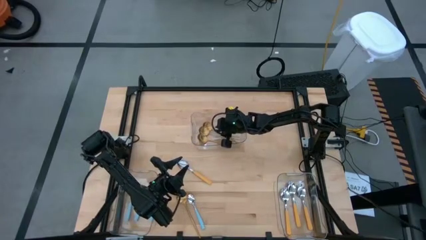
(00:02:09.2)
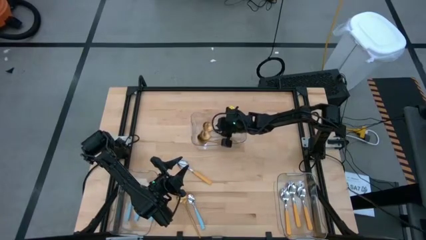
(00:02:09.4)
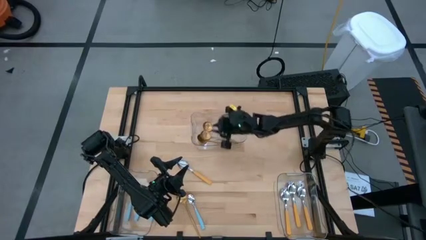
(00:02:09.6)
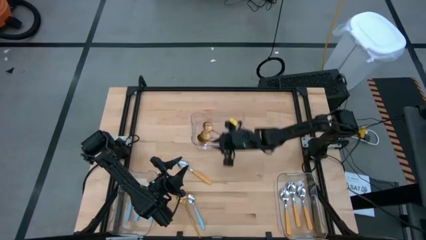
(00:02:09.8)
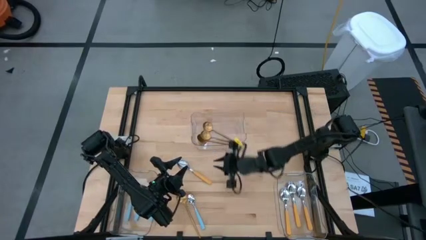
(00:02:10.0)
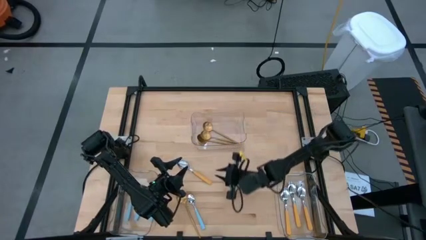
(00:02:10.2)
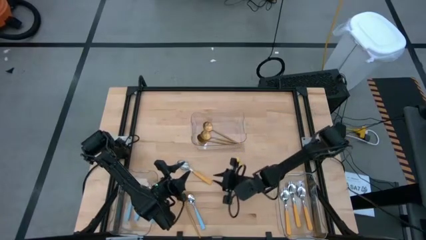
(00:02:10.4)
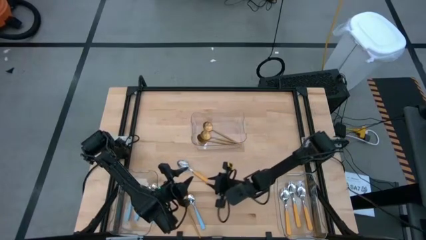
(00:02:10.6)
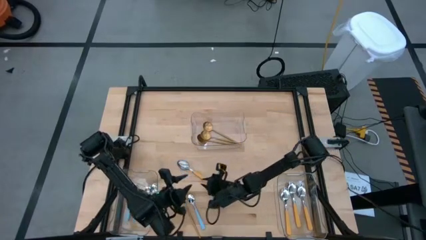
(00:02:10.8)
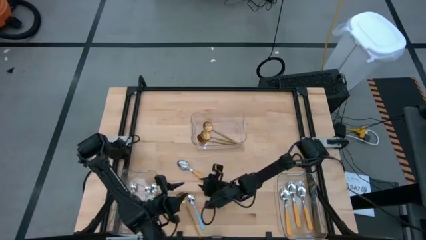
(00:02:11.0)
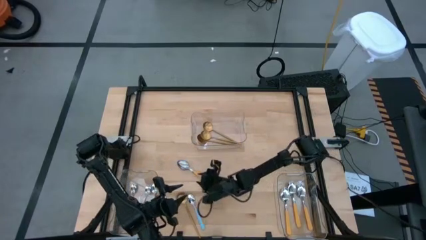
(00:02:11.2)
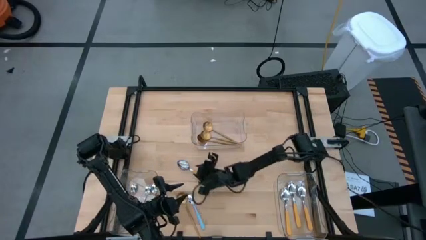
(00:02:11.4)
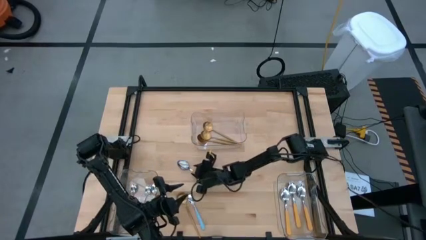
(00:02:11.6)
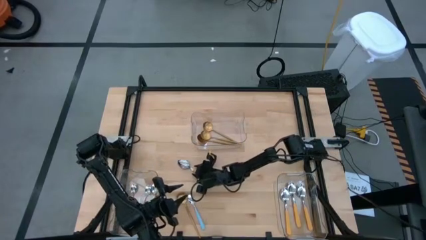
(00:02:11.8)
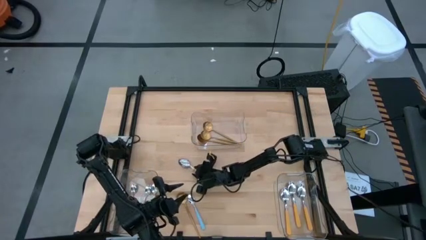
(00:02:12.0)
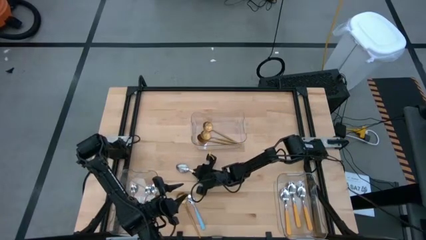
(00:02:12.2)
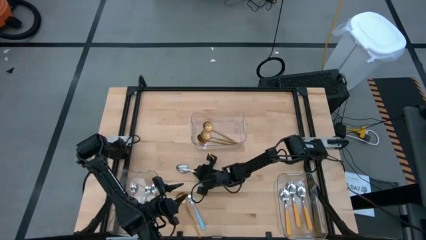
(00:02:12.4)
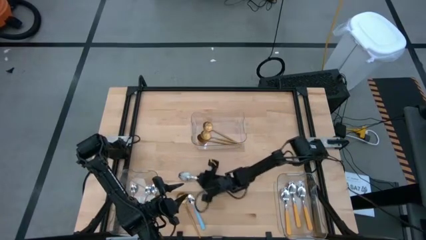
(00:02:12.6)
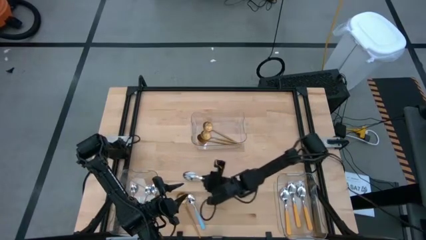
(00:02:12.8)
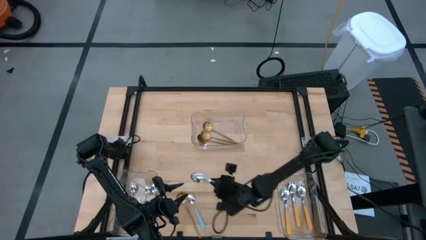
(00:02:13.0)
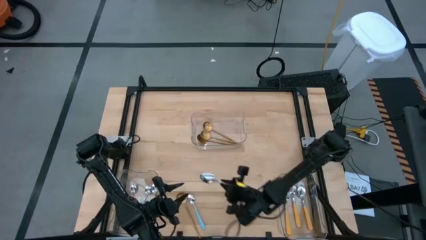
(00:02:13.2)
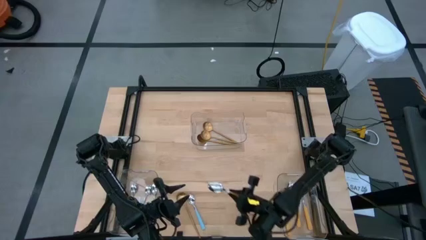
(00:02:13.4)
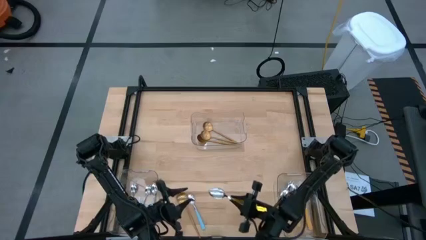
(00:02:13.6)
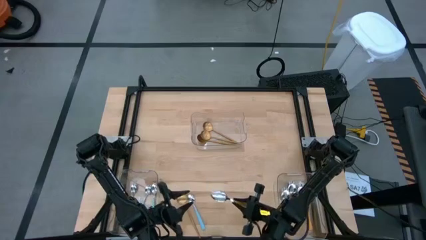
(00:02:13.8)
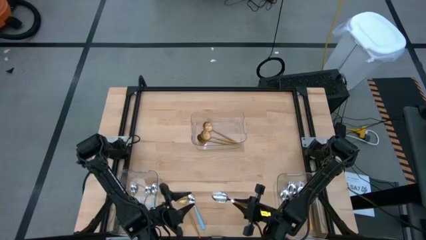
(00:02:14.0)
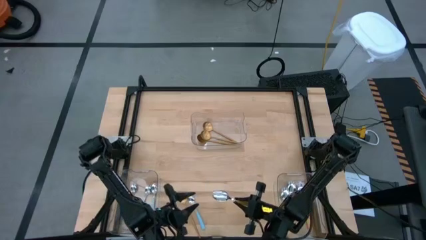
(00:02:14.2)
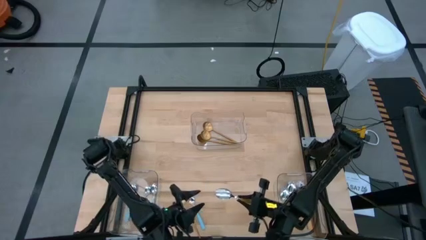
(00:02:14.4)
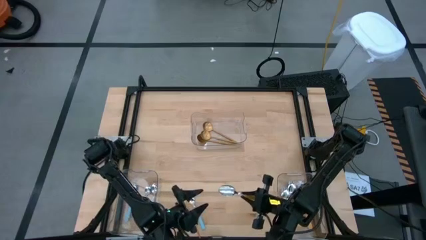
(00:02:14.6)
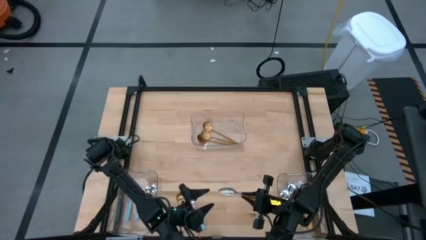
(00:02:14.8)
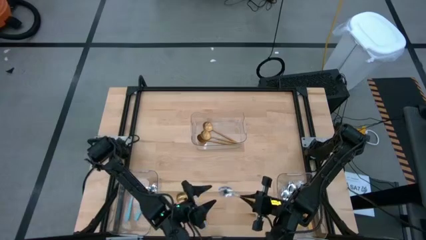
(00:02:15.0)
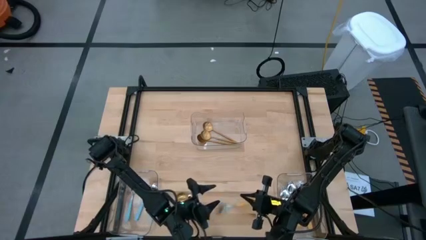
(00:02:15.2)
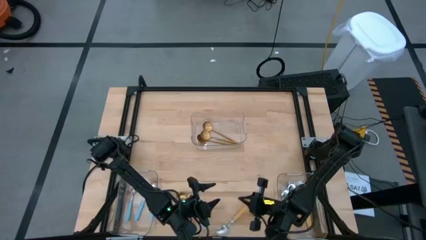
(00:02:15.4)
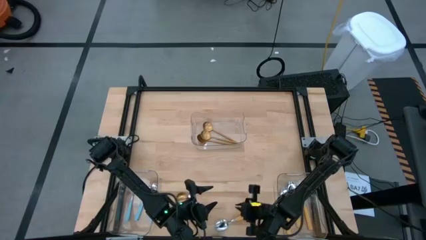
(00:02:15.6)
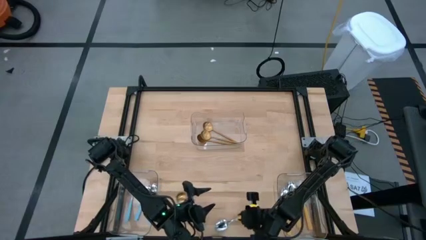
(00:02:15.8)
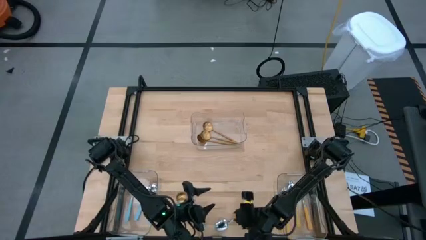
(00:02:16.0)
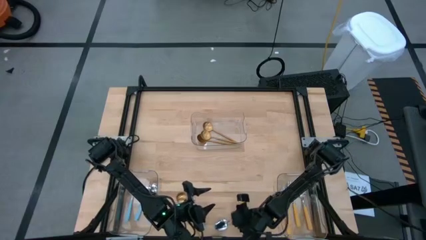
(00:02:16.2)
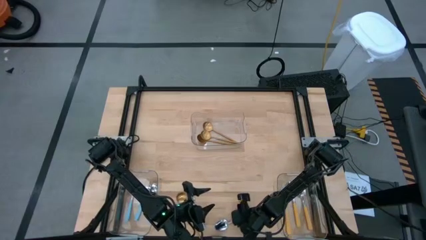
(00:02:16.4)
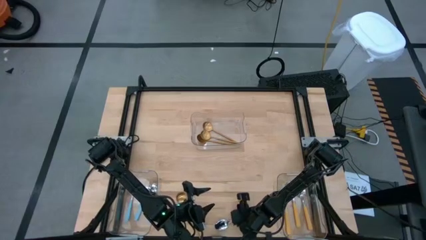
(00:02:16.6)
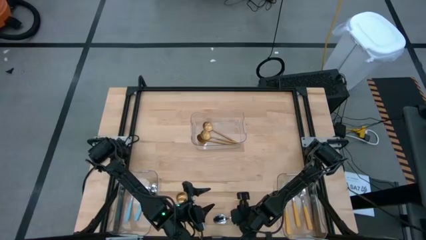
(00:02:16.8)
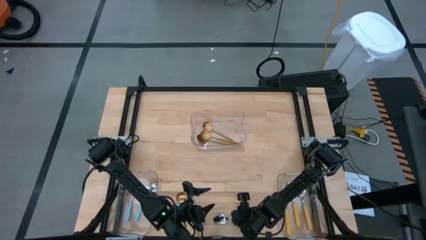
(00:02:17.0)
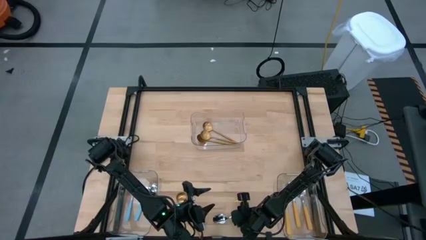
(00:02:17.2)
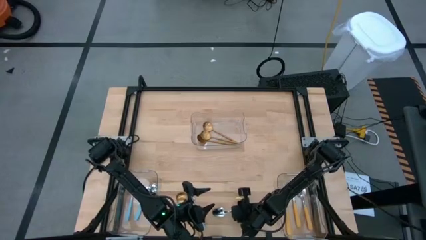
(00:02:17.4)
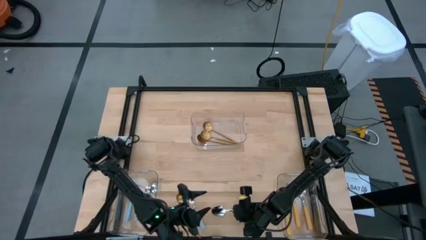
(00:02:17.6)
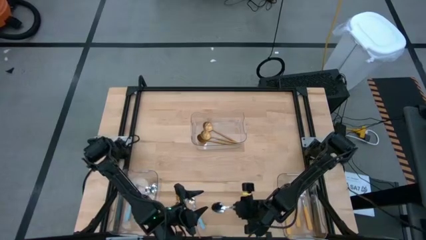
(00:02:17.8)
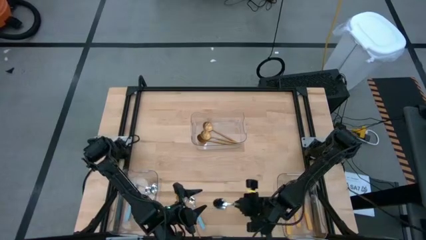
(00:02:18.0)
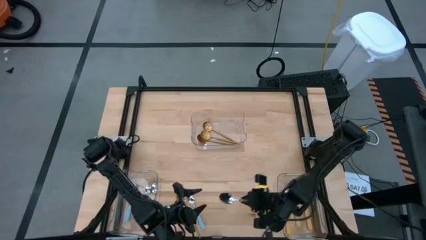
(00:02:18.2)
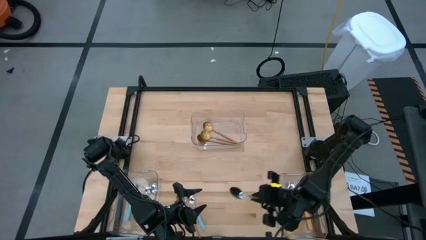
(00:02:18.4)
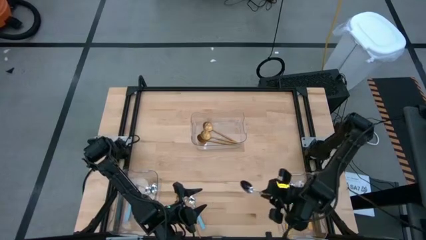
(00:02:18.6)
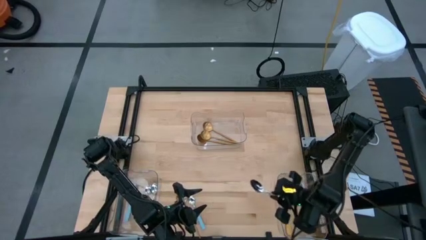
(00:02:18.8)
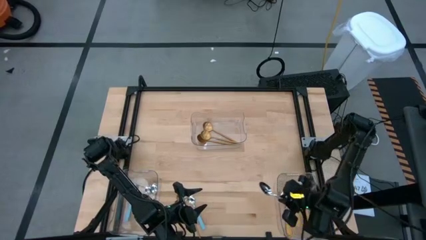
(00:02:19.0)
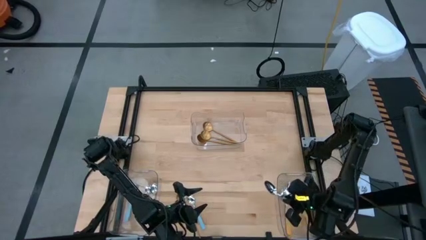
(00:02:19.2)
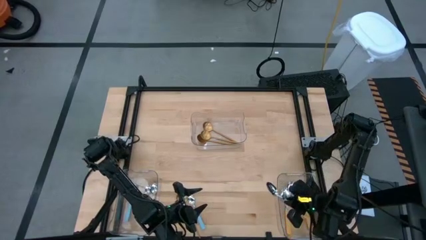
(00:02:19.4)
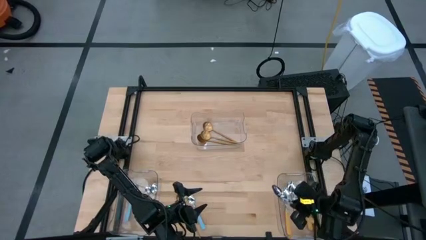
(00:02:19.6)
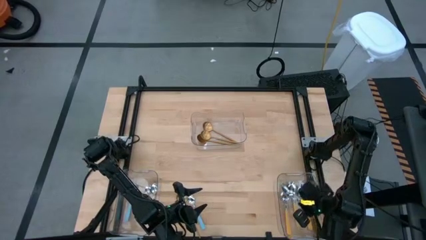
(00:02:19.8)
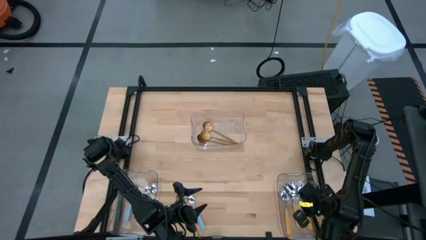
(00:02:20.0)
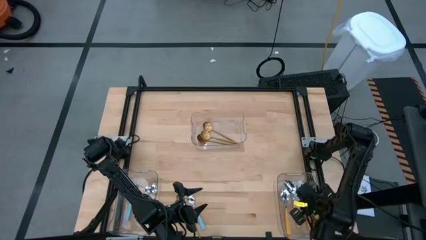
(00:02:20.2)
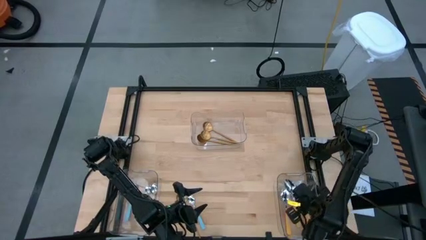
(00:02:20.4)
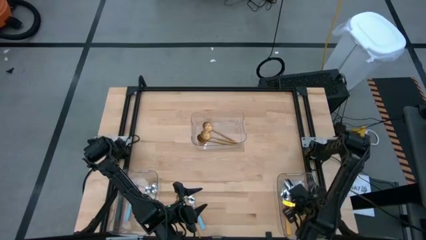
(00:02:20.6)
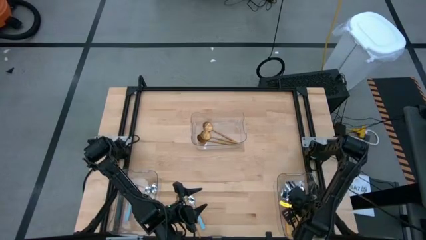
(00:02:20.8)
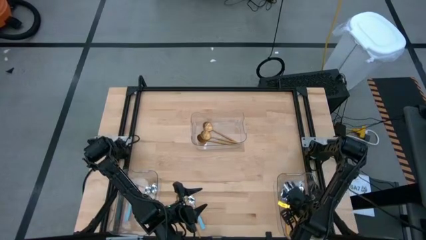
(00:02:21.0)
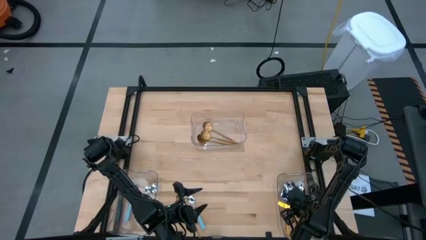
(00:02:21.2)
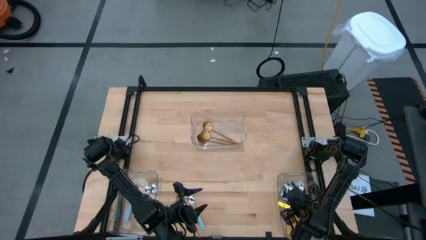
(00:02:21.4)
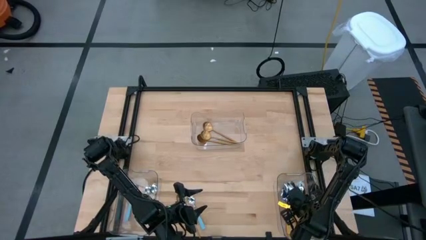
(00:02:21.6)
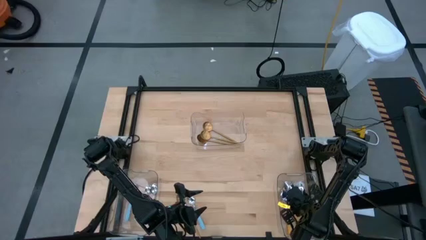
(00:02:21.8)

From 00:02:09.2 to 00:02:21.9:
Task: Sort silverware by color (type)
Put the yellow spoon into the bottom right transparent bin
